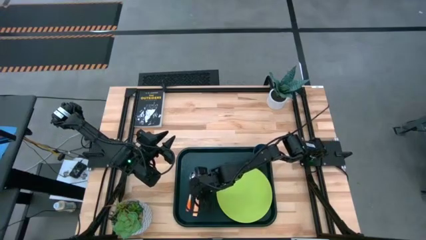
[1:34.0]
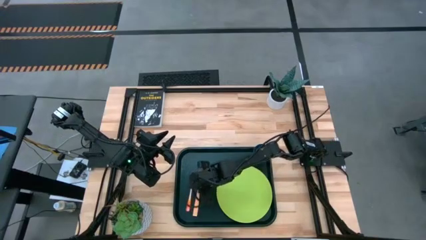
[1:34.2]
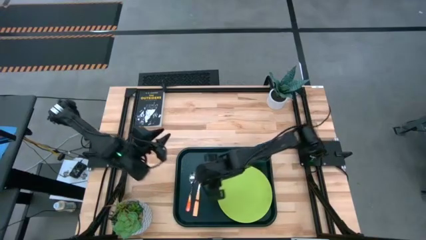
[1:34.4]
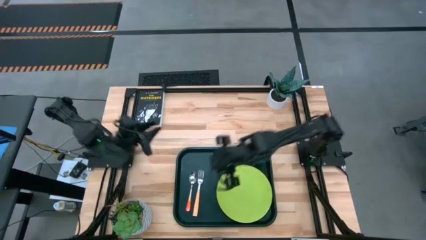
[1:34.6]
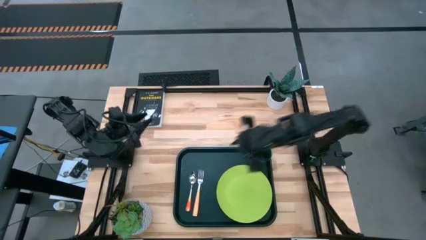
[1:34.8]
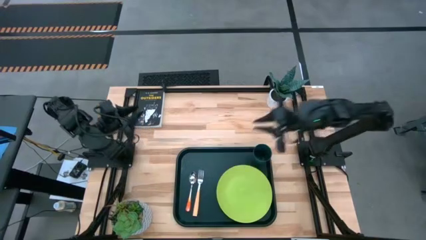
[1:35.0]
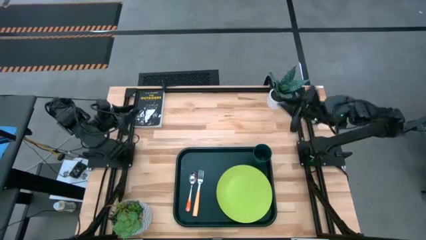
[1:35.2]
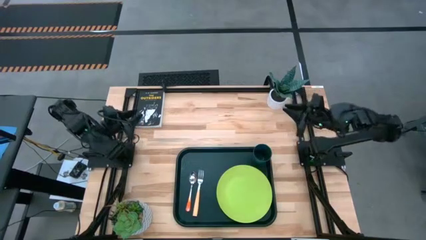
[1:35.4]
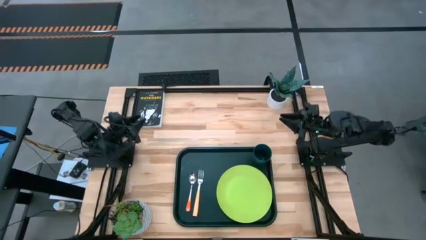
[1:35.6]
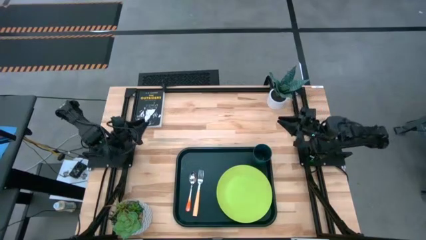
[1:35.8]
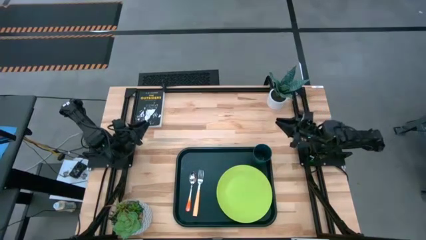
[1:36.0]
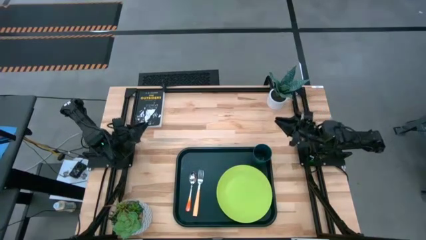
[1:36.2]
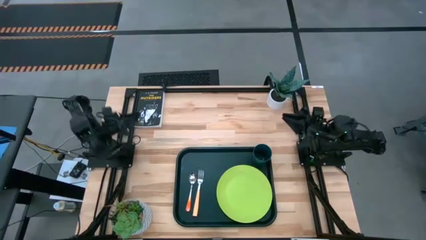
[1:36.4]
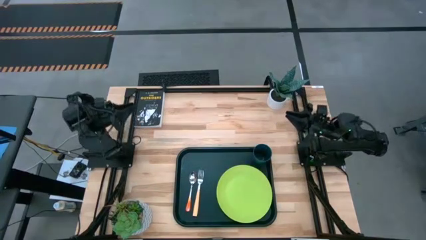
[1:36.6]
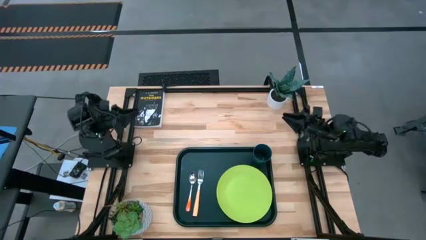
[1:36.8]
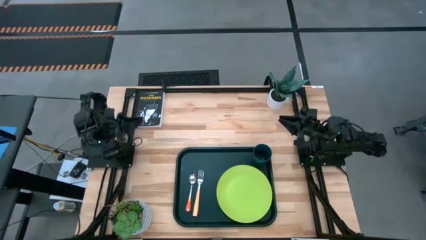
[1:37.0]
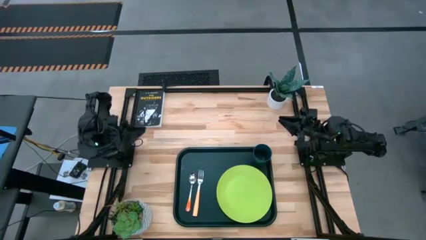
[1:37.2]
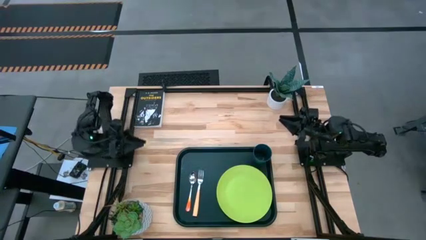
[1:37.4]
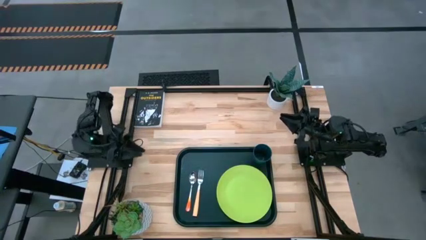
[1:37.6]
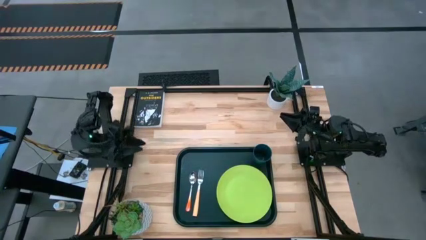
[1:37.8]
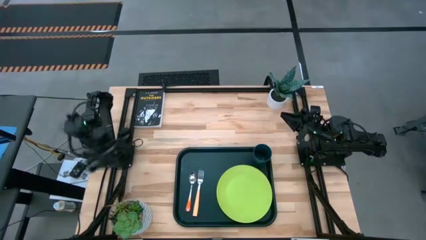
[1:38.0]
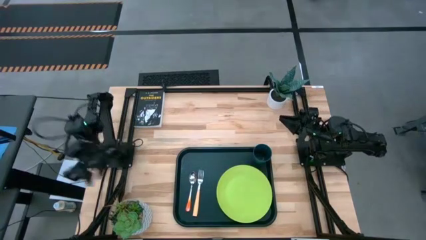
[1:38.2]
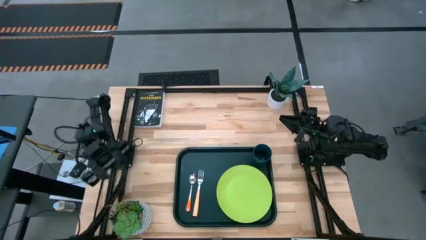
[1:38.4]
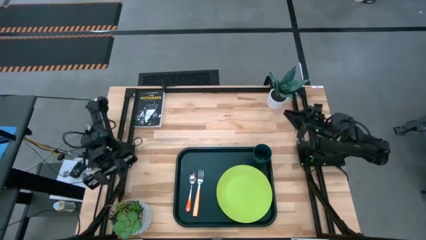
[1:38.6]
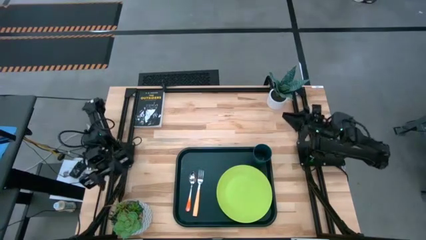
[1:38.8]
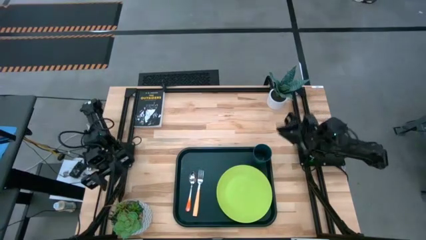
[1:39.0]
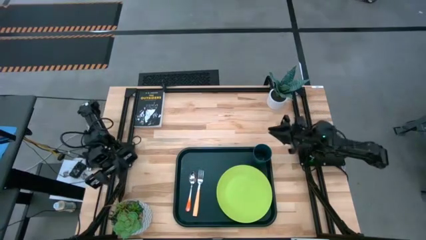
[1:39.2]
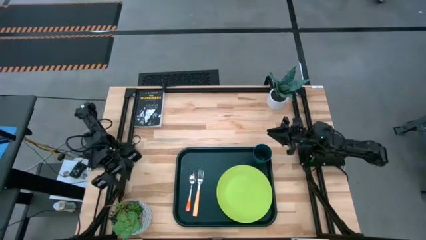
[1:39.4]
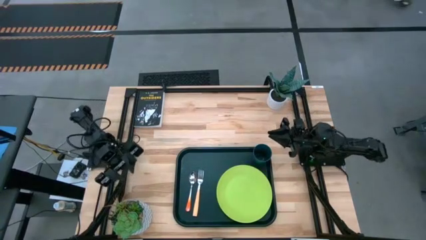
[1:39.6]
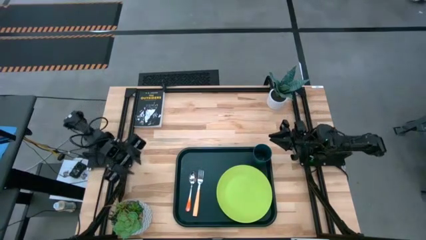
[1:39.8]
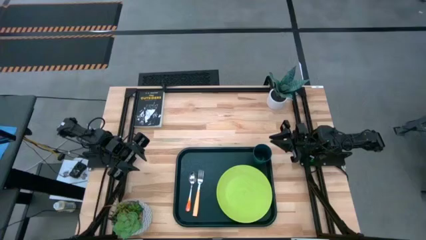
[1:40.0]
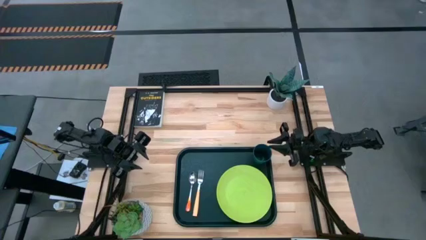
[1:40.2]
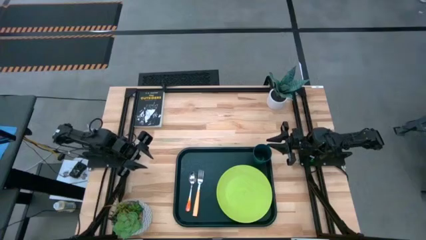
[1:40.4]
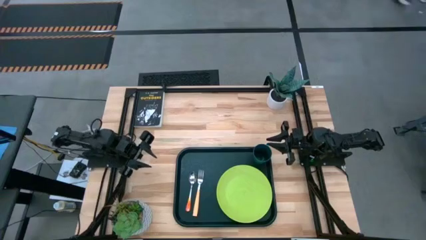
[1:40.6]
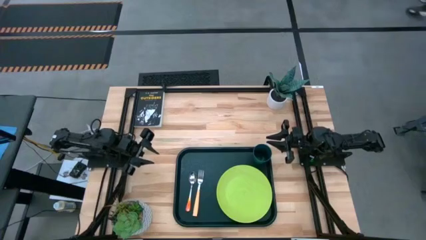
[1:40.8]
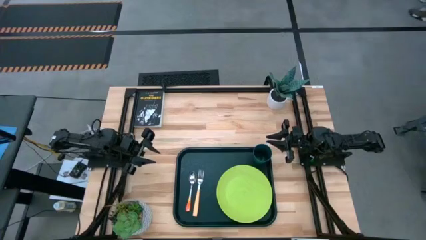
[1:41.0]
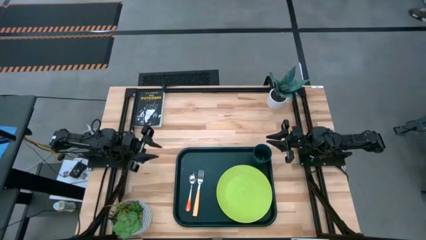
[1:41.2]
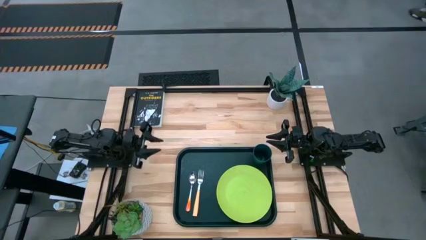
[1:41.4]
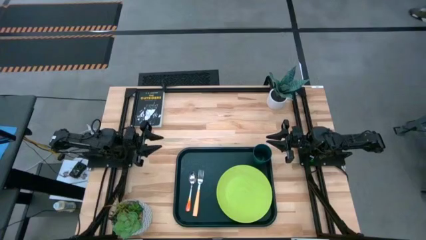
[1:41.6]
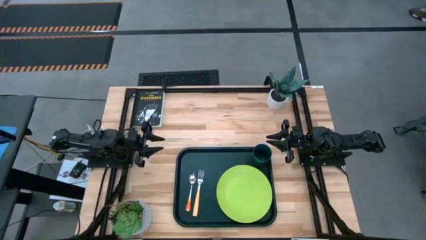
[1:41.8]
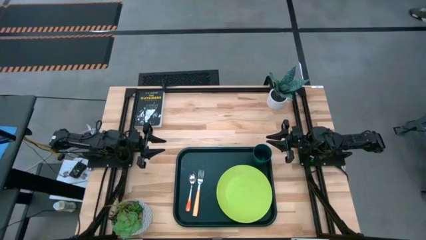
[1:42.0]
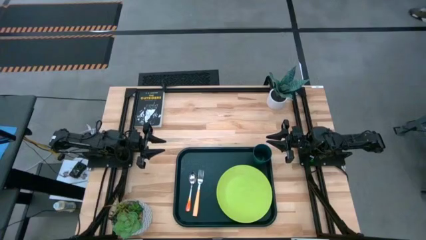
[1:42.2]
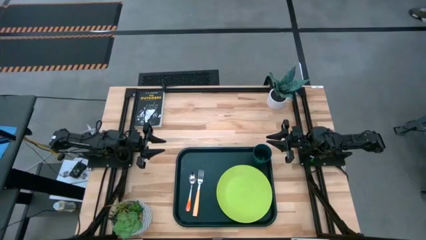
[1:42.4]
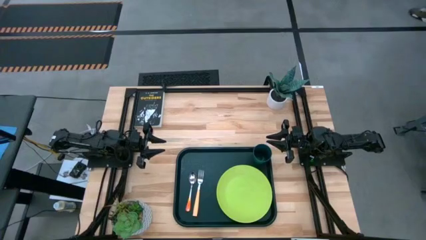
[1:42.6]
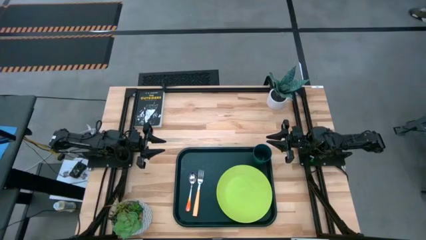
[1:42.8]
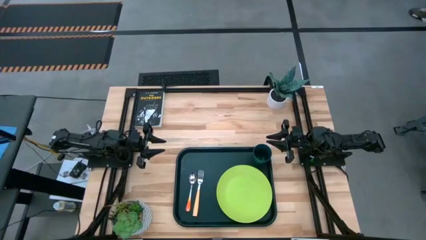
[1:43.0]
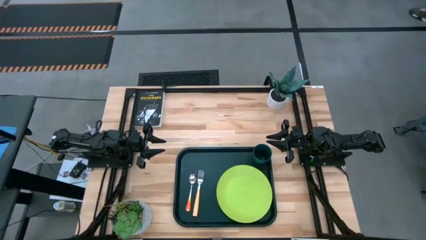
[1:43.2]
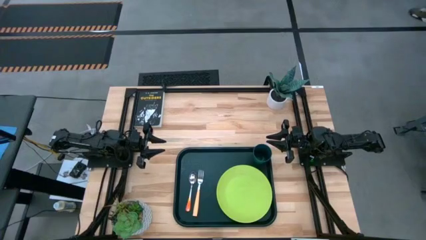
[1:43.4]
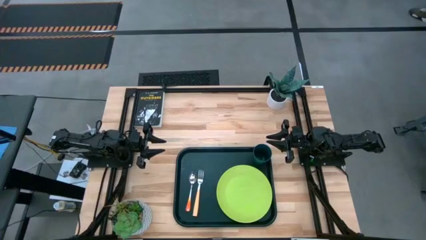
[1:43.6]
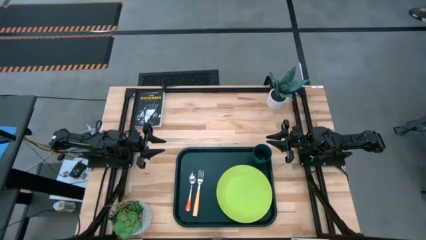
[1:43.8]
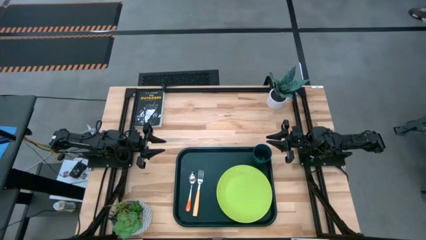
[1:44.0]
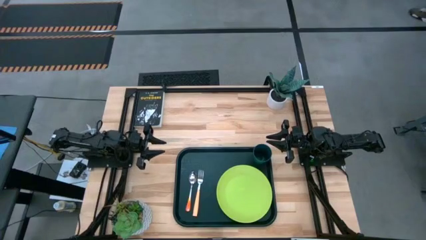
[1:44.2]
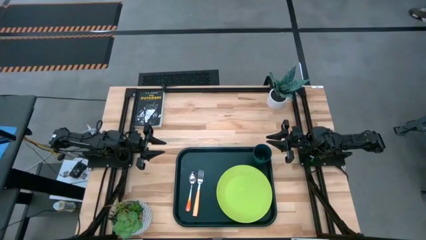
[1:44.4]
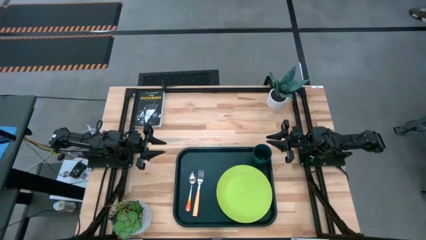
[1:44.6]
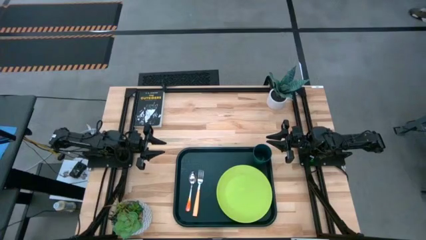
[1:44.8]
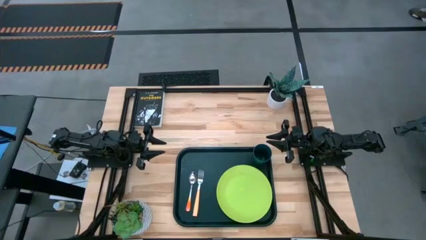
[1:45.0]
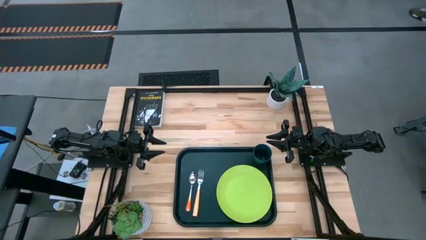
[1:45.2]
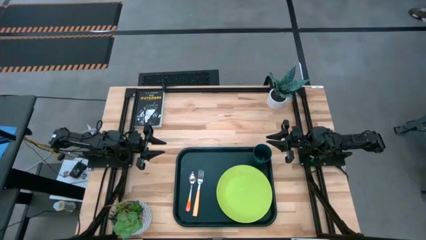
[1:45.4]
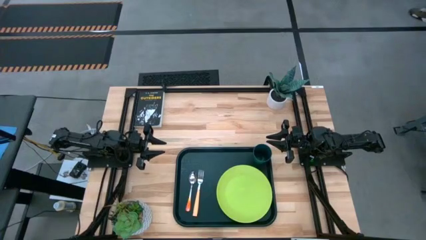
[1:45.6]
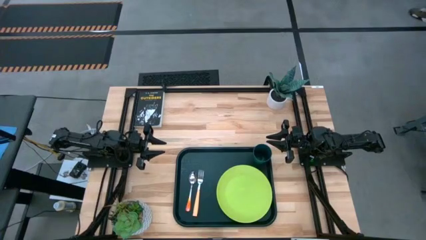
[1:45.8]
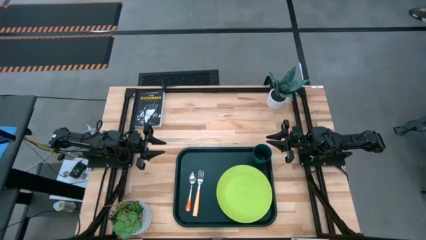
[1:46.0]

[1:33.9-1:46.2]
Task: Pick and place plate/cup/fork/spoon on tray
Return to Home Position

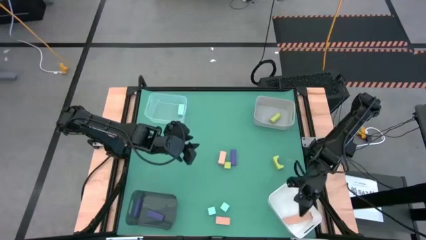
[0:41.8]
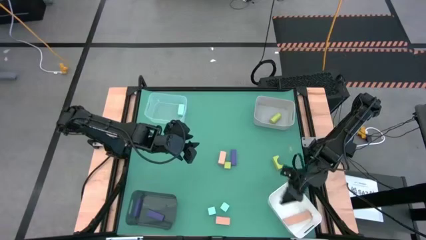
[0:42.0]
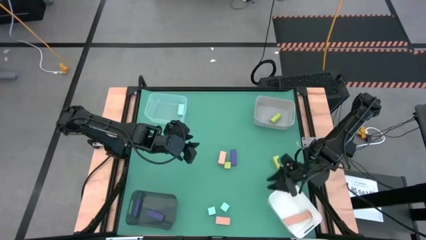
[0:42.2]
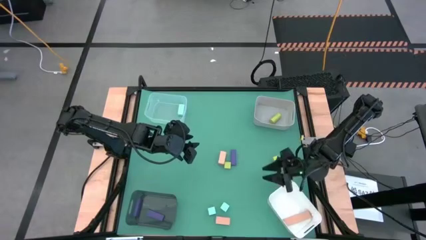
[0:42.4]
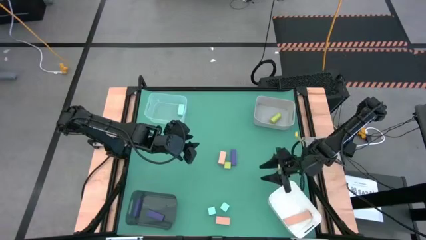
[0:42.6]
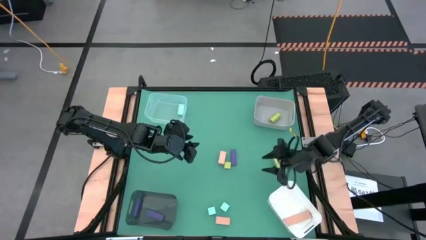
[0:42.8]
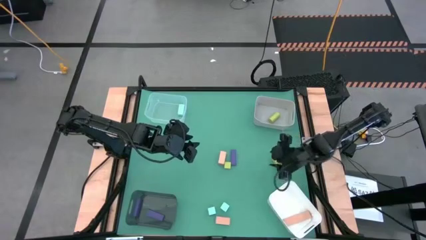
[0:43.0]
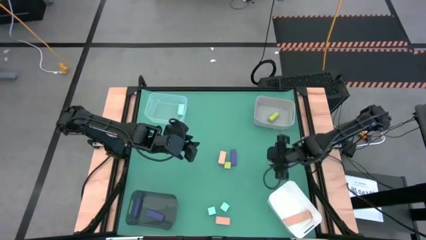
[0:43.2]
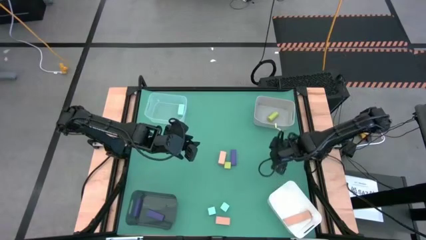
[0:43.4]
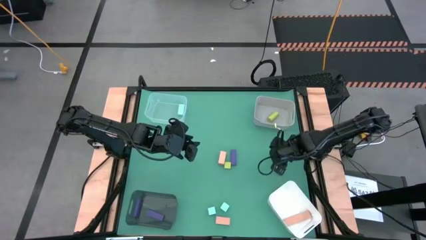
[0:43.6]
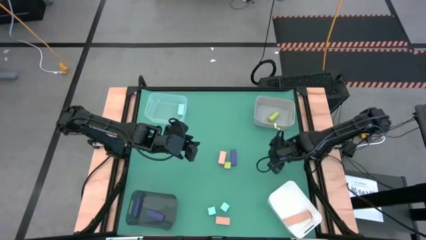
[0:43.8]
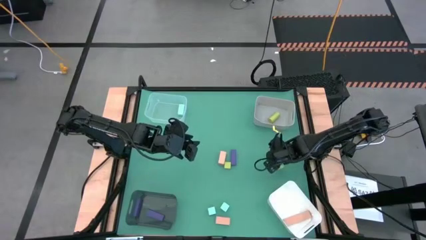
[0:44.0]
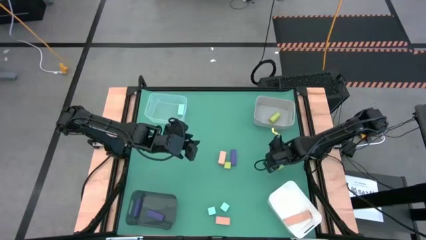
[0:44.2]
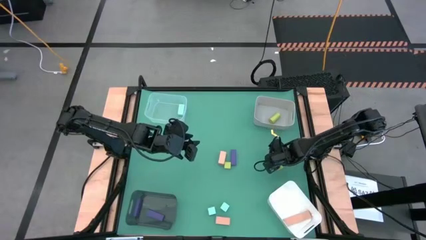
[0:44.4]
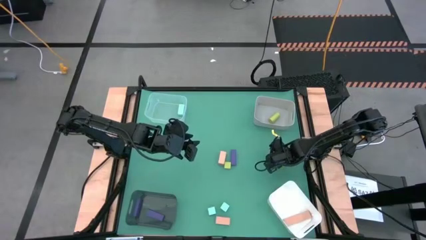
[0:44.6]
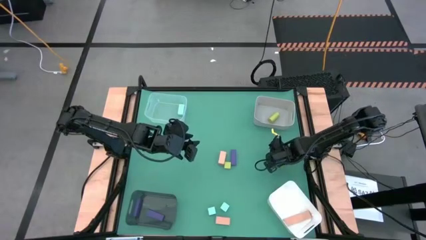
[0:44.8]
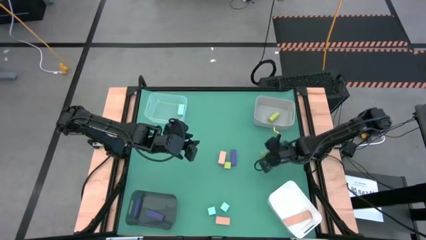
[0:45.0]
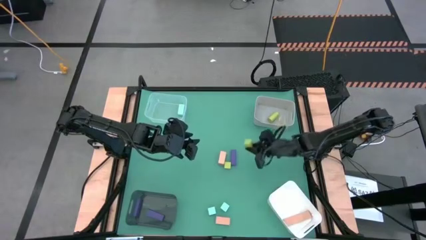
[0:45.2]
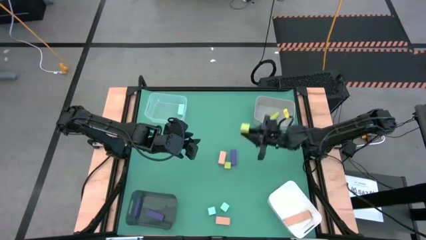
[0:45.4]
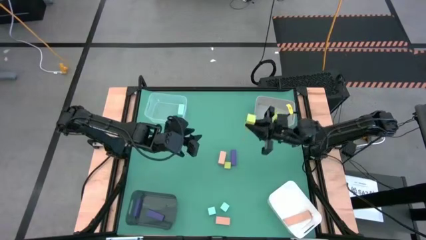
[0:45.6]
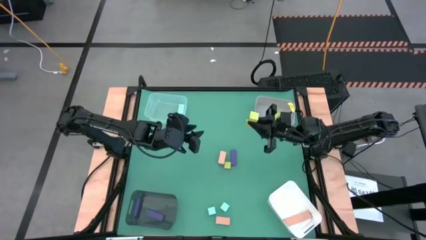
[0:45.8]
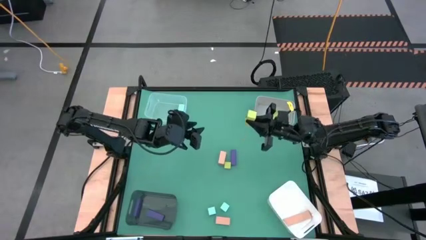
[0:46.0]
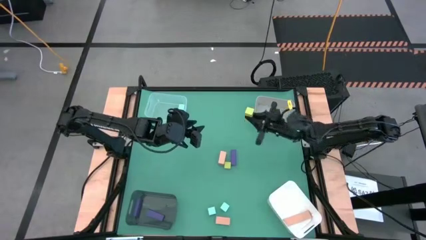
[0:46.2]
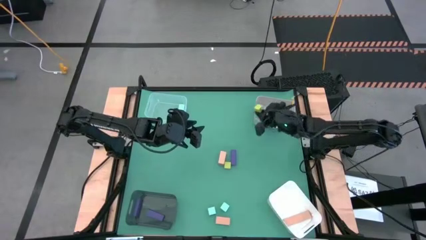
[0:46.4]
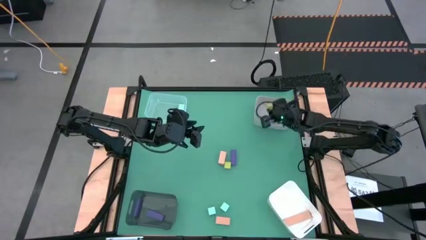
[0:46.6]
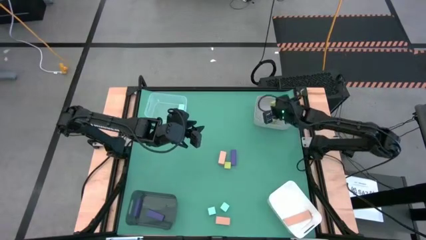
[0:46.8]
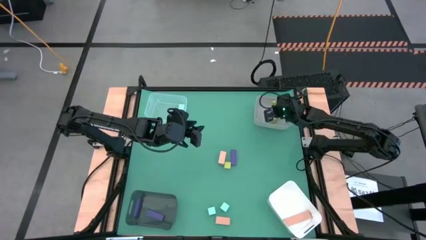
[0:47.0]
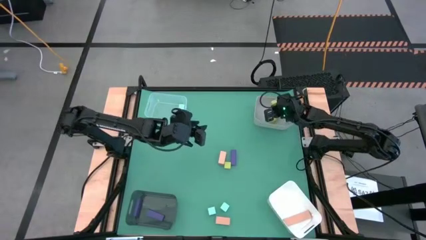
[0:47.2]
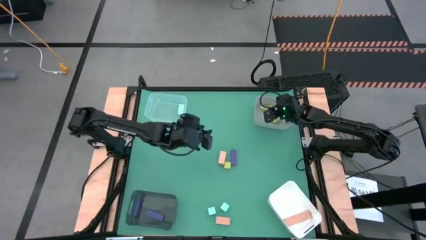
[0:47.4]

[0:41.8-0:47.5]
Task: Sort & place blocks by color
Put the right light green block into the gray bin
